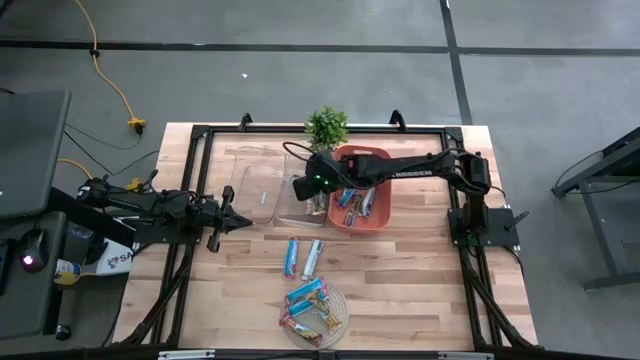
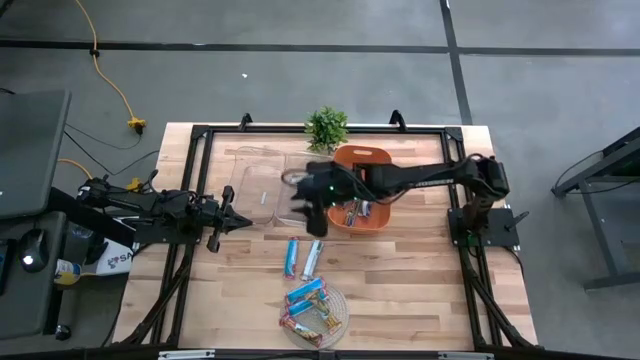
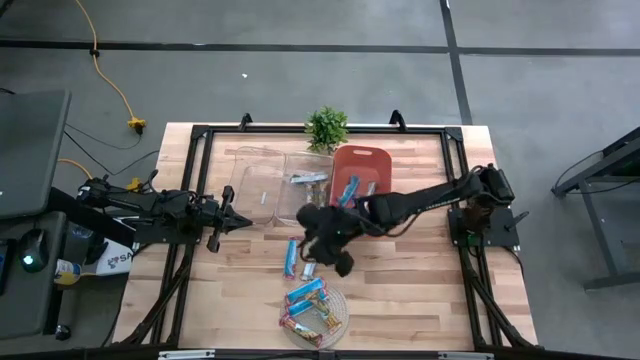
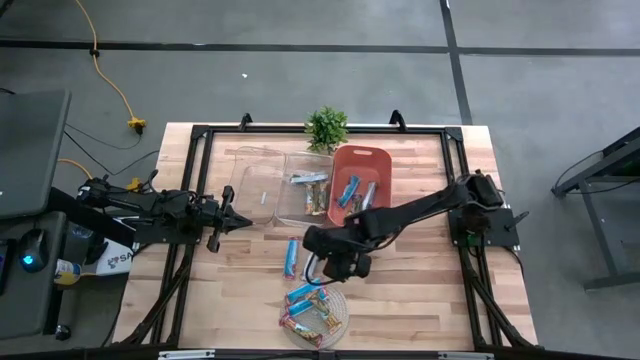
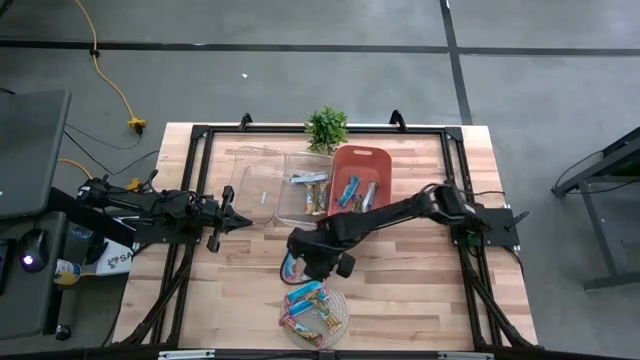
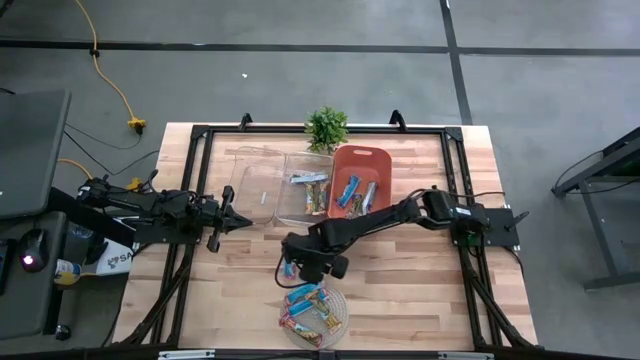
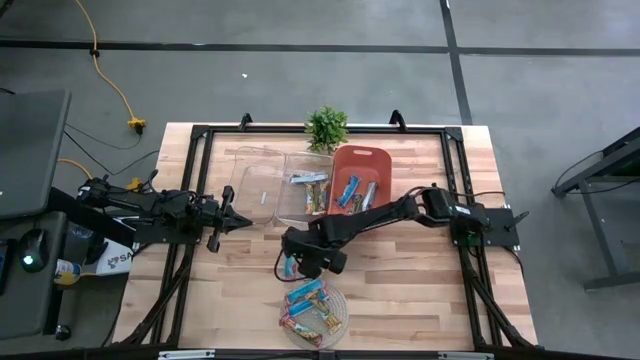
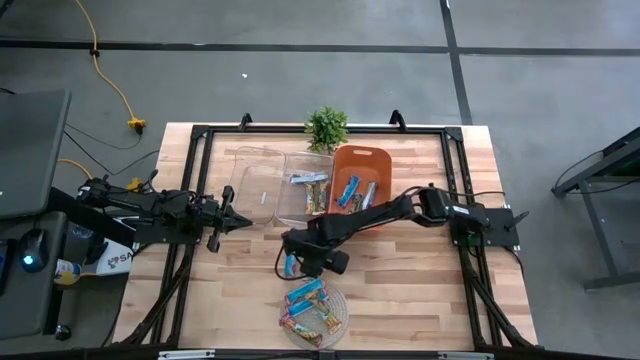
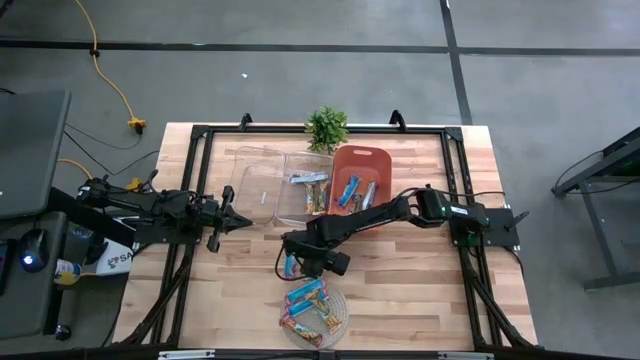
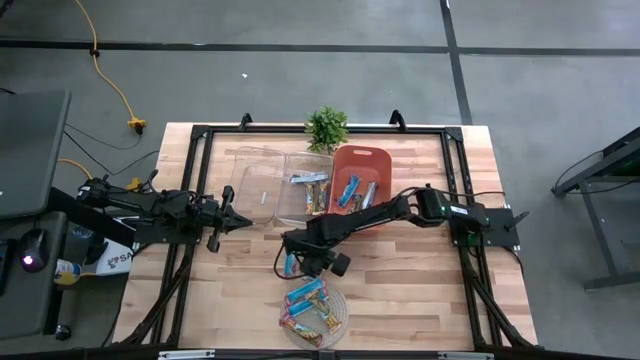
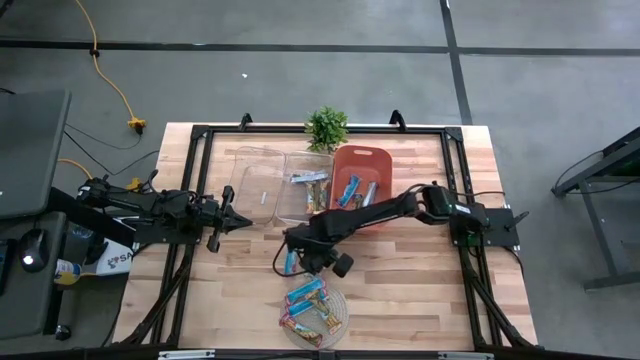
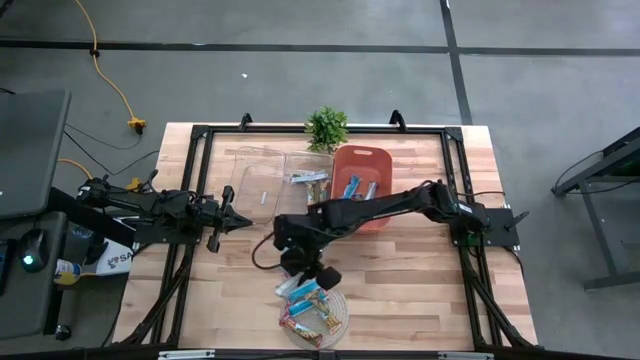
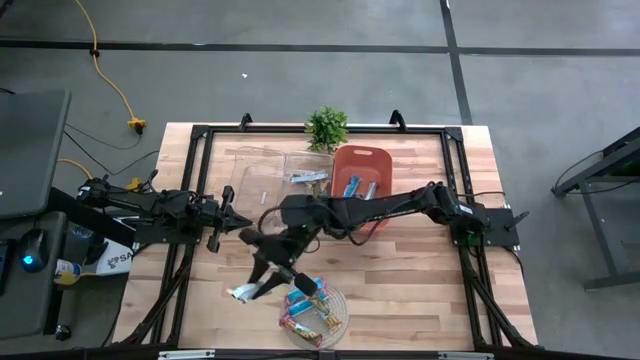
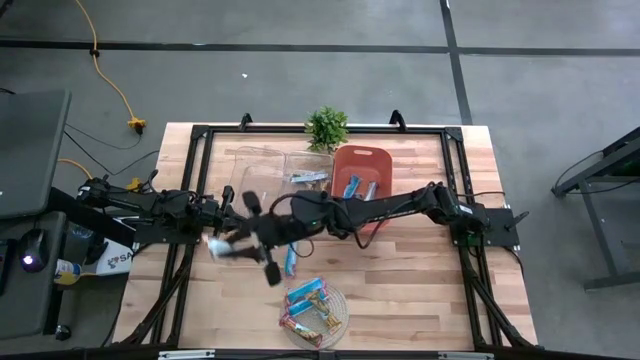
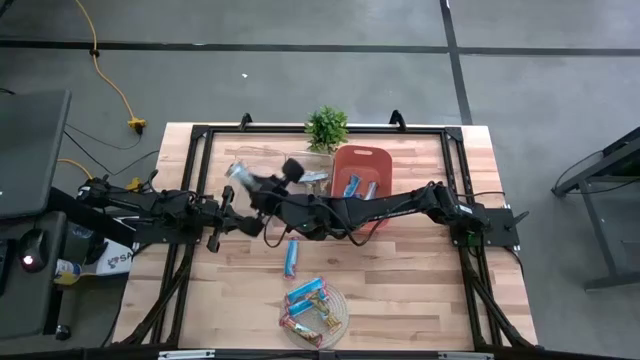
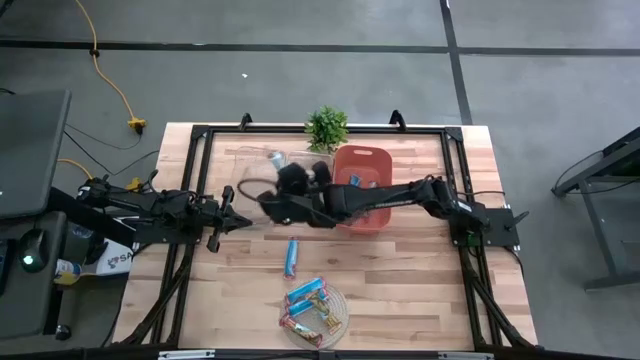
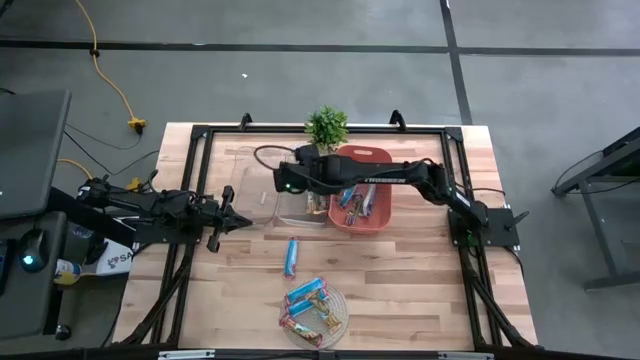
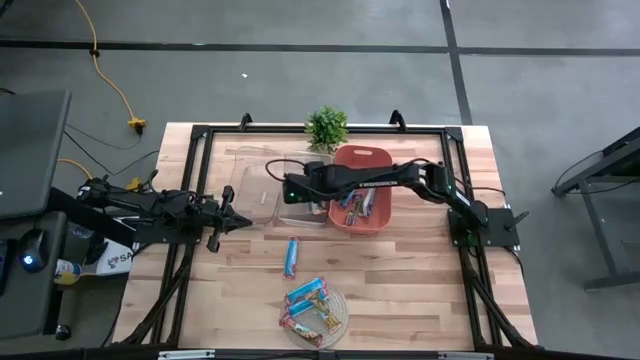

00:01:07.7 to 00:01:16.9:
Task: Pick and place Granola Bars by type
Put the top yellow granola bar into the right transparent bin

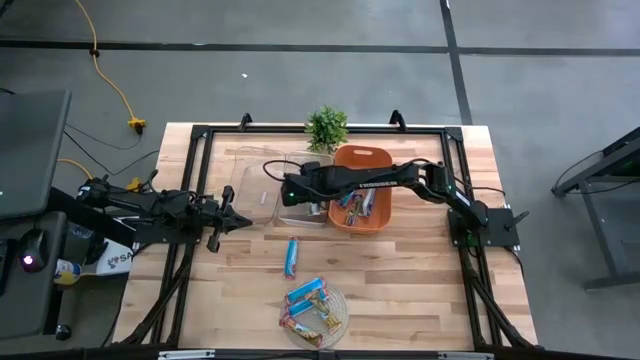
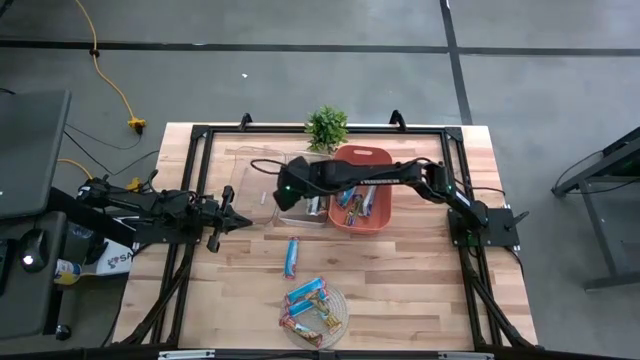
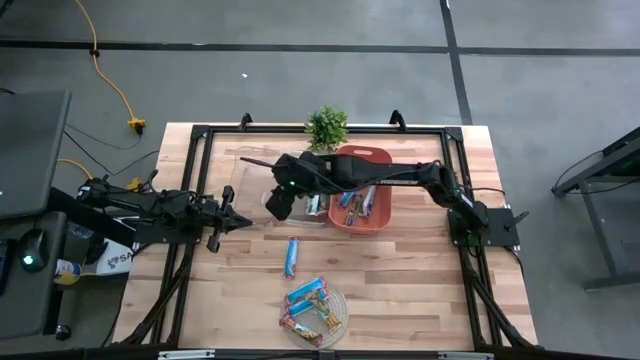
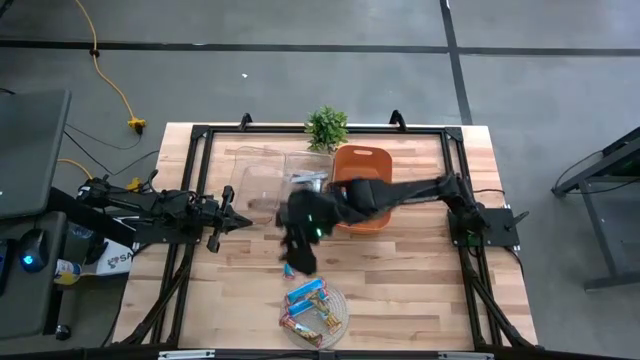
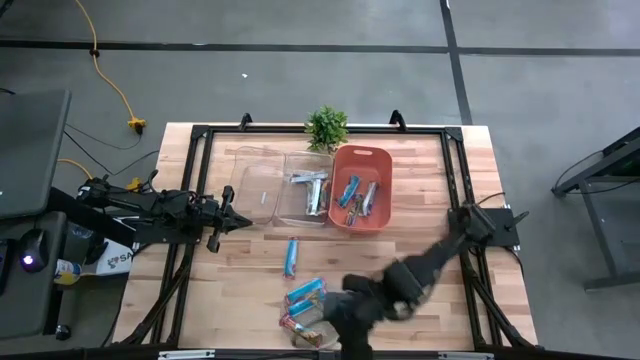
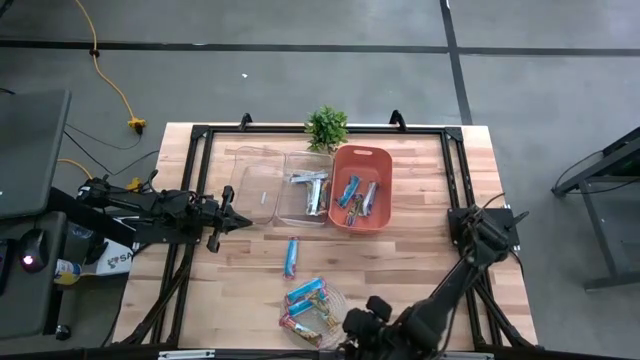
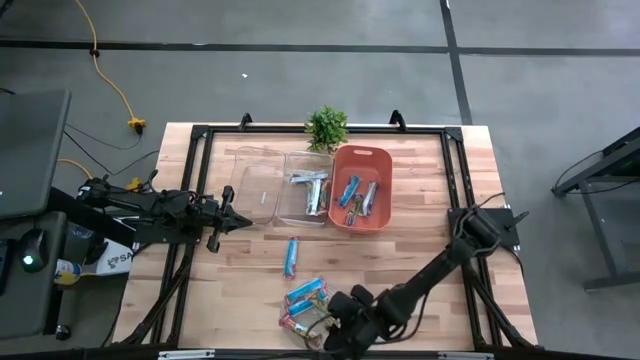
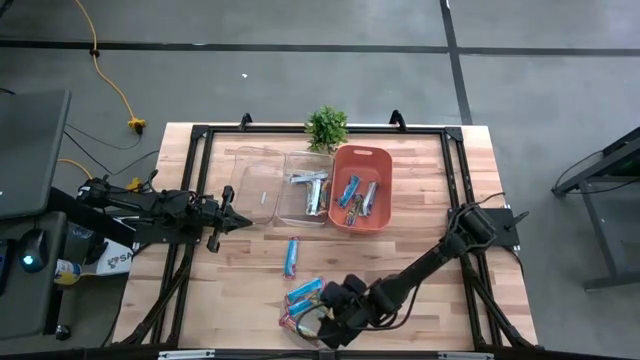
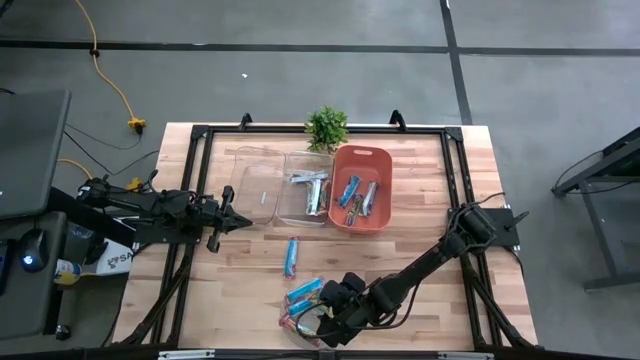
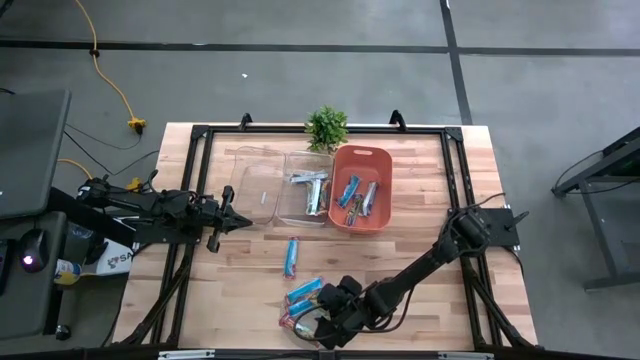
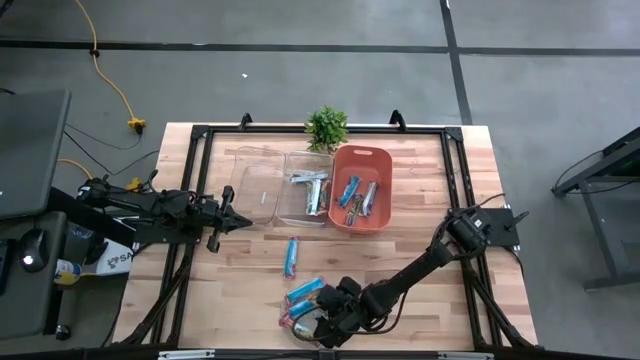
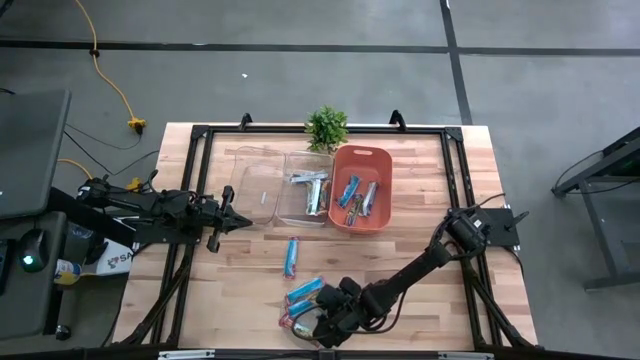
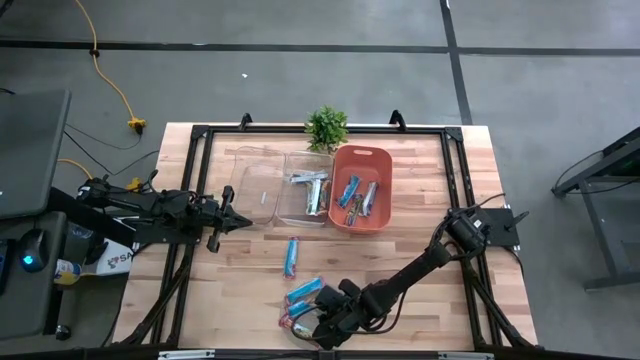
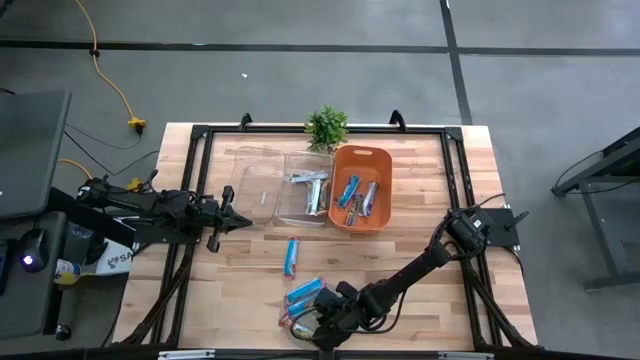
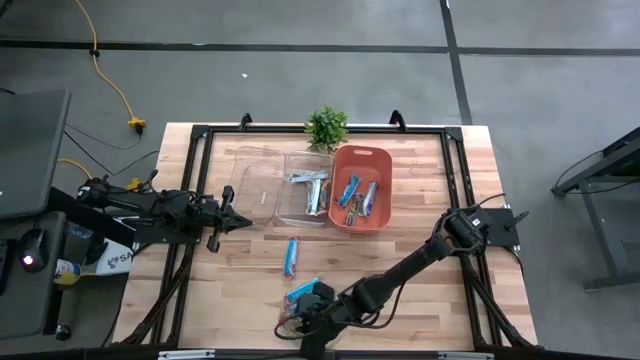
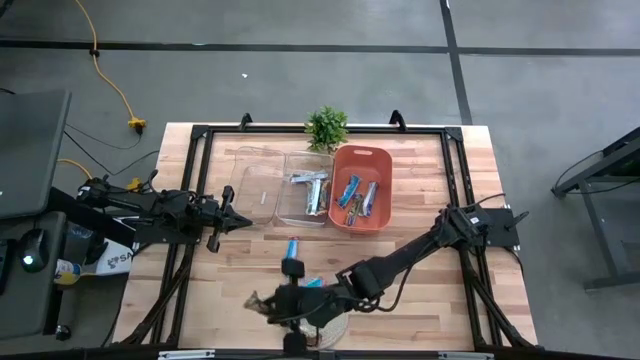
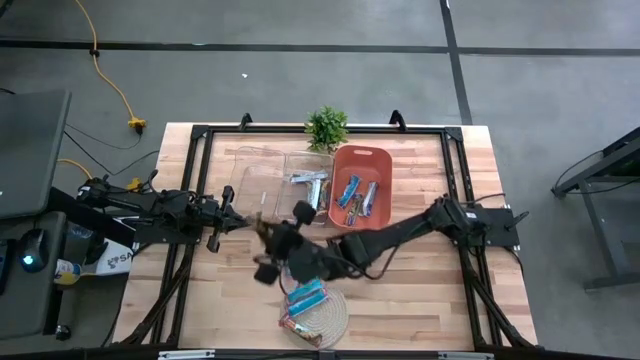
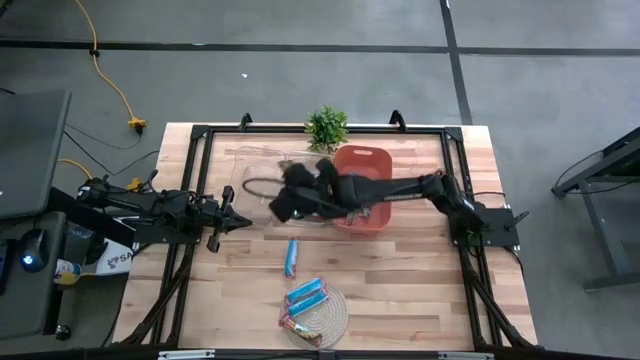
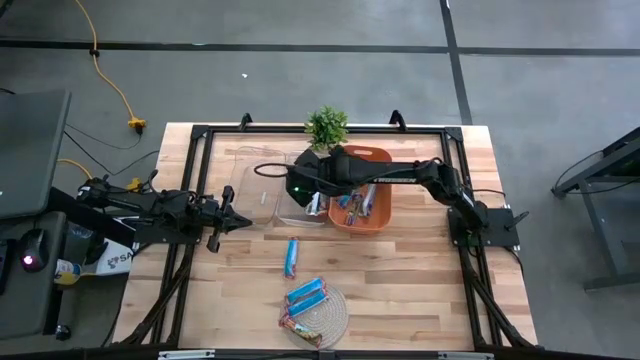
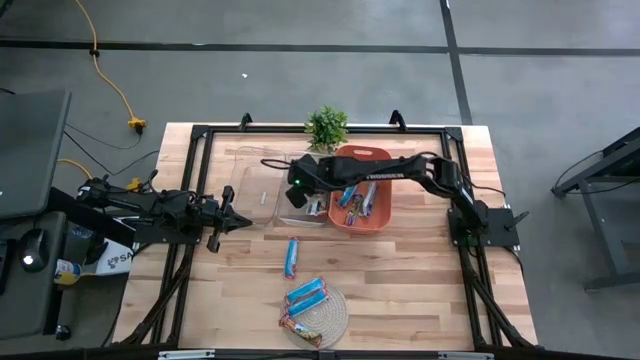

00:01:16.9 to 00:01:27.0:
Put the yellow granola bar into the right transparent bin
